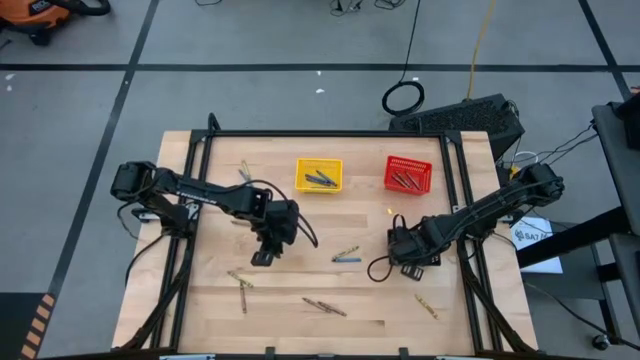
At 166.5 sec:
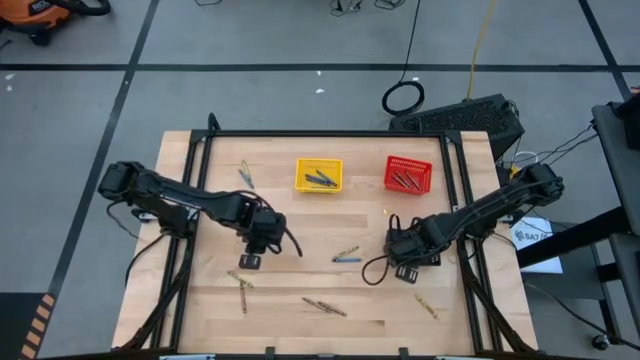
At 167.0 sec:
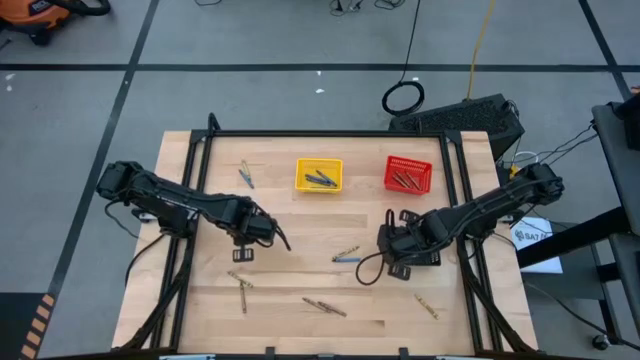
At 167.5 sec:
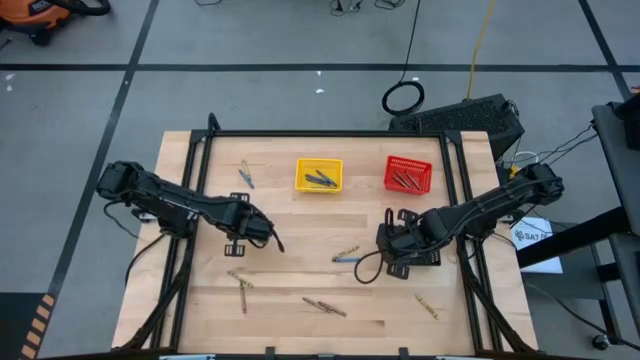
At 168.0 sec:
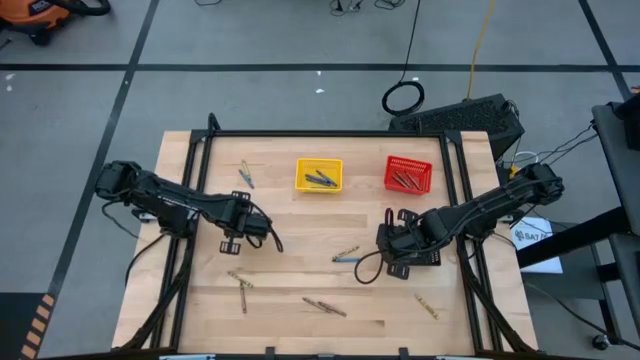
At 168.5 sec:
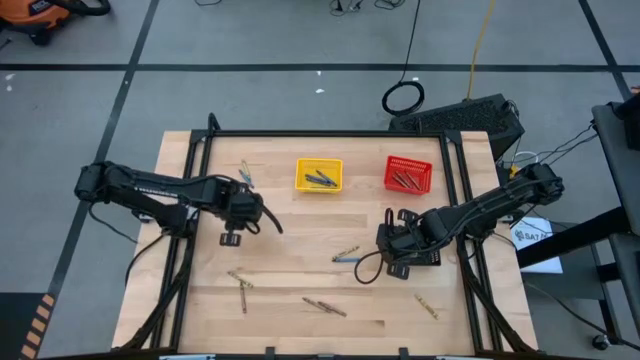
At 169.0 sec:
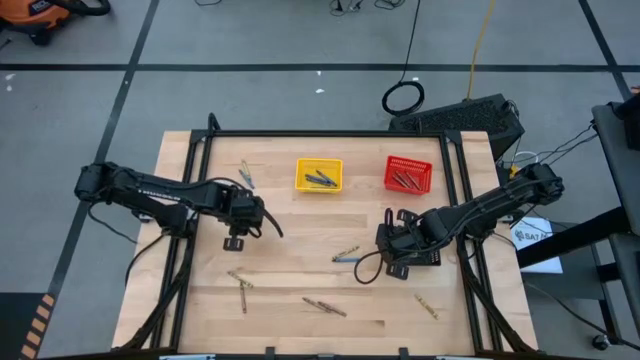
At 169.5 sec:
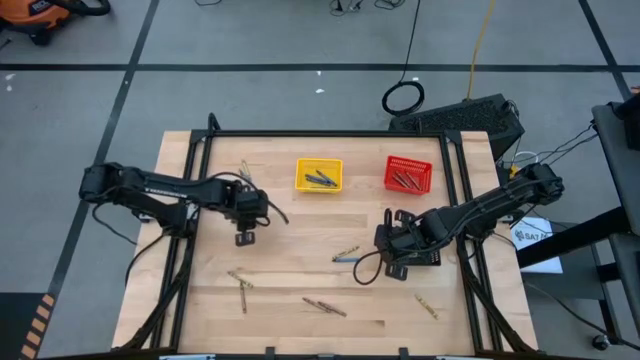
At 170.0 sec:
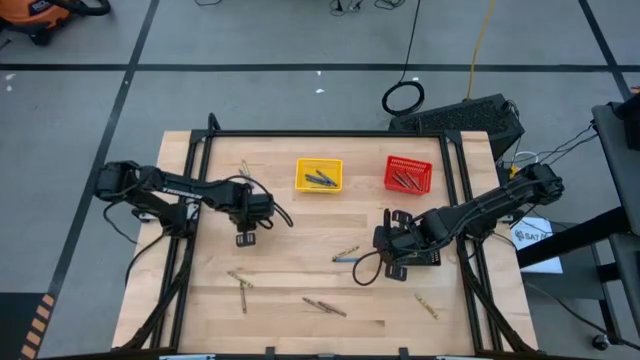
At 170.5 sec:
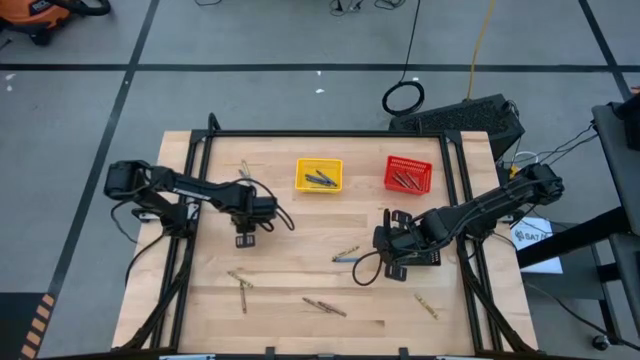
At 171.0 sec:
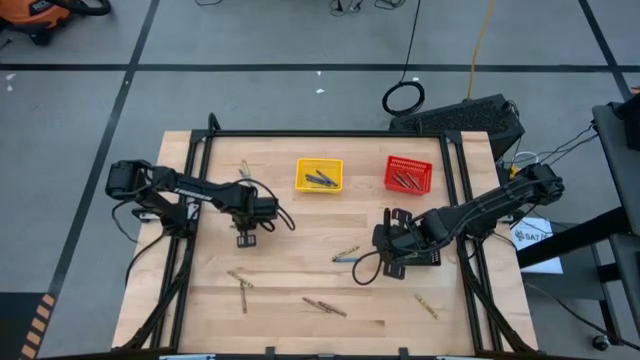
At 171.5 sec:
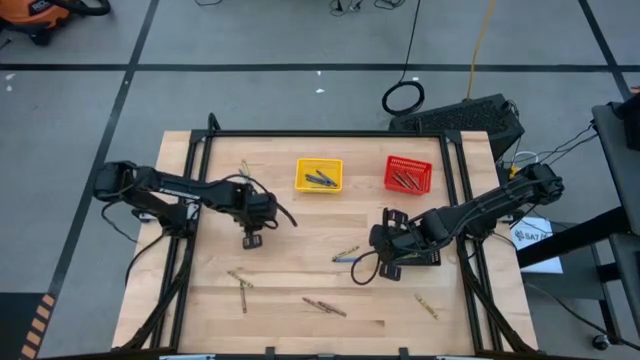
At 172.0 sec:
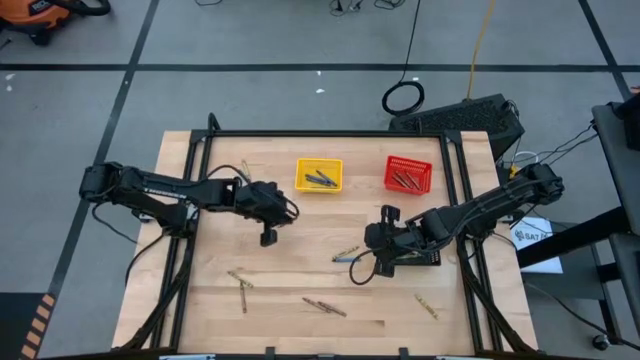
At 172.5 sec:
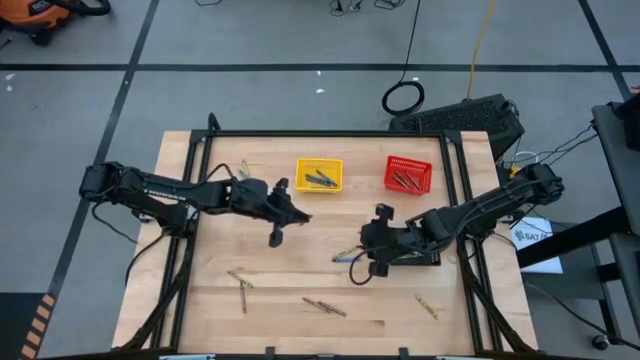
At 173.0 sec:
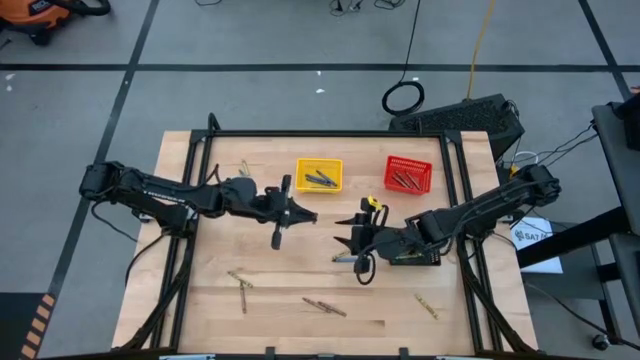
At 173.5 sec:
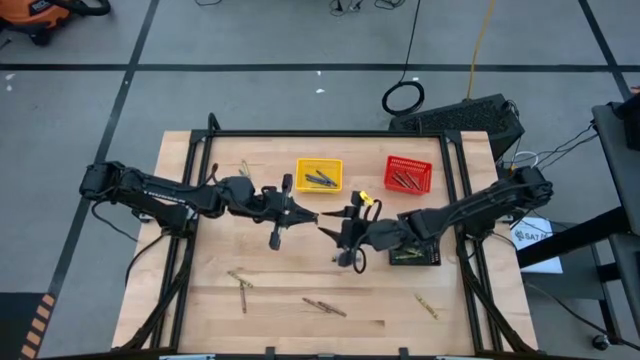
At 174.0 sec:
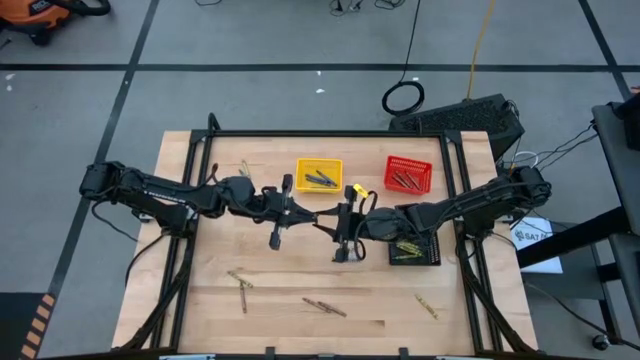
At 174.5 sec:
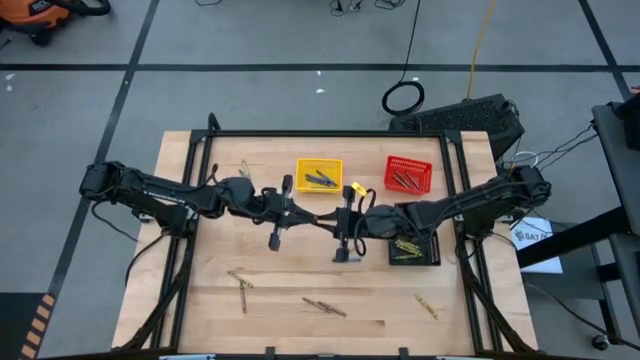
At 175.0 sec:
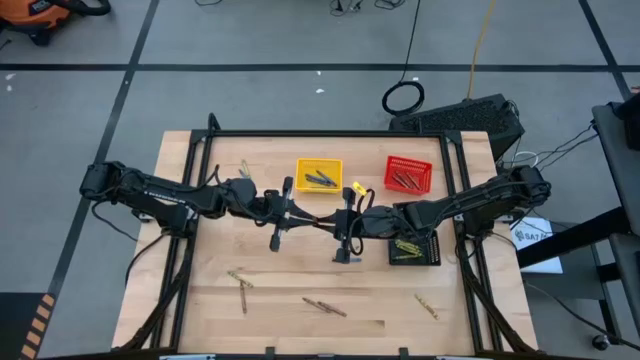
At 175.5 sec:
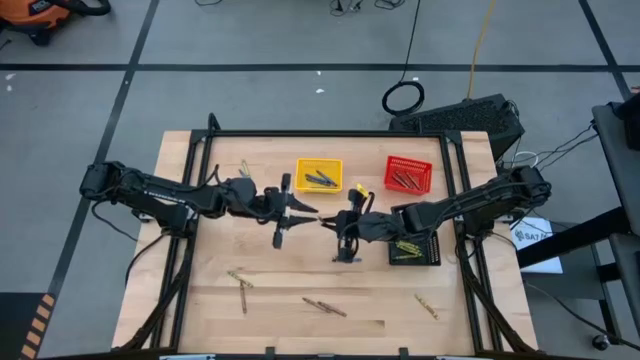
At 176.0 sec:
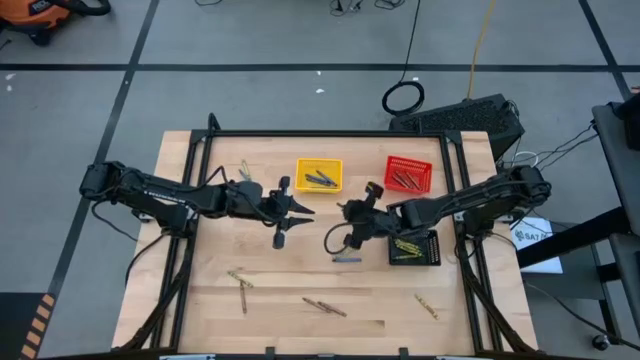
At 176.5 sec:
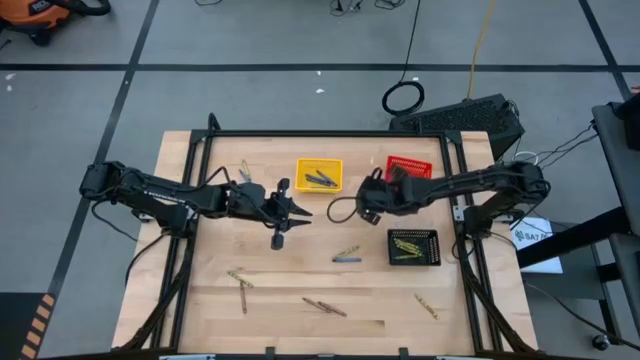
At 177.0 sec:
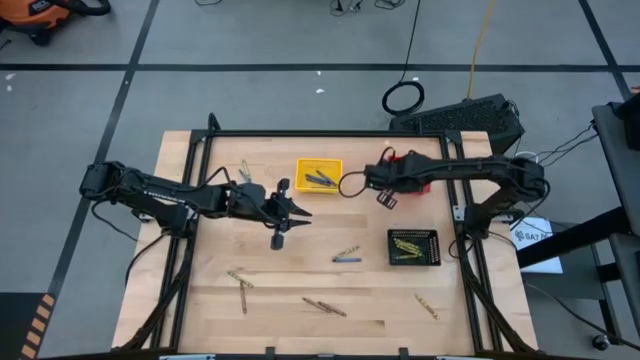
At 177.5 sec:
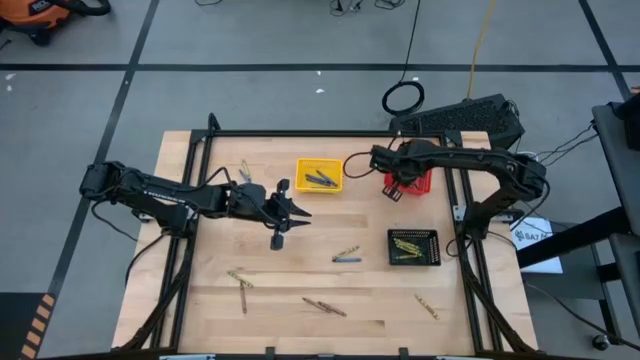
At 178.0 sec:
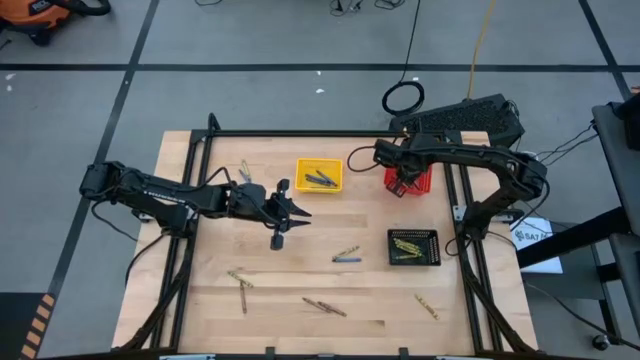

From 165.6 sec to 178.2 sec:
Task: Sort crayons
Put the brown crayon into the red bin

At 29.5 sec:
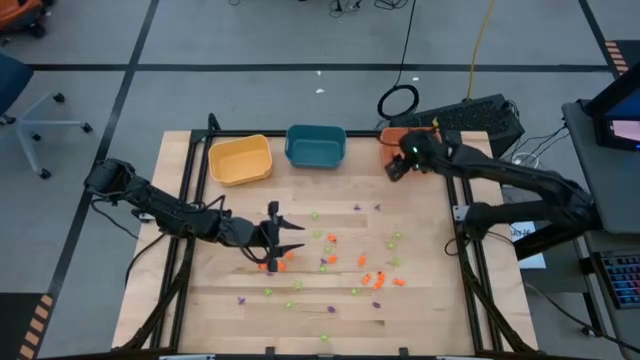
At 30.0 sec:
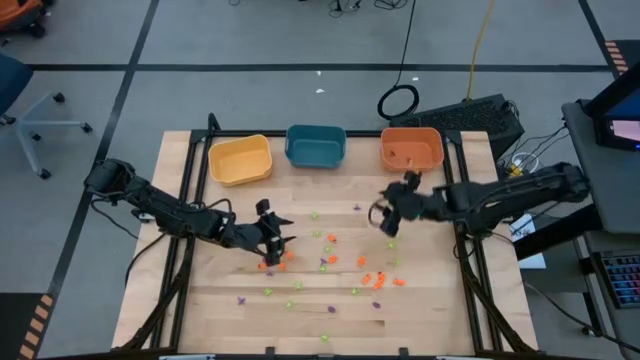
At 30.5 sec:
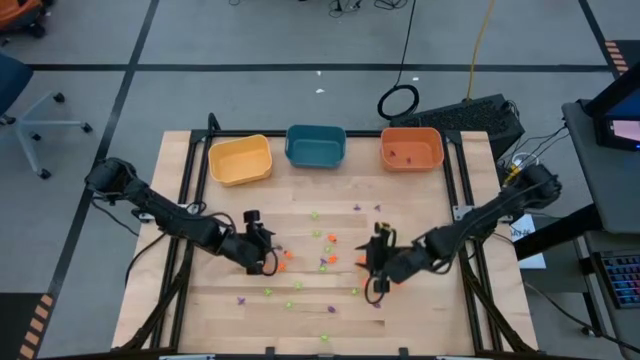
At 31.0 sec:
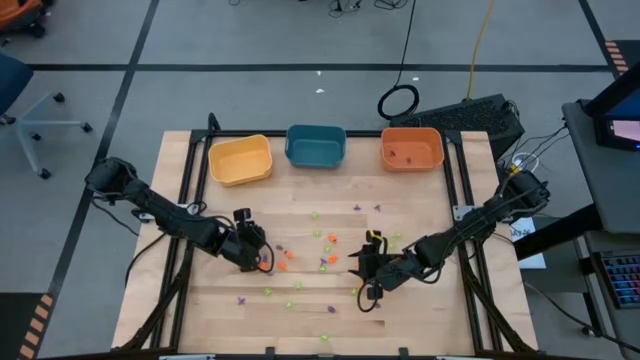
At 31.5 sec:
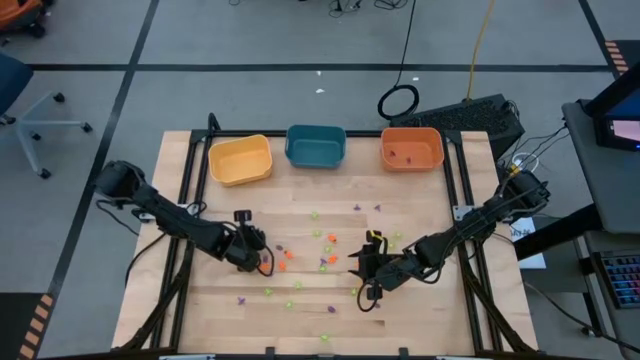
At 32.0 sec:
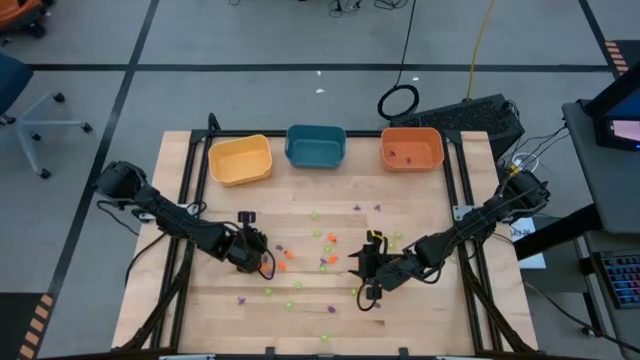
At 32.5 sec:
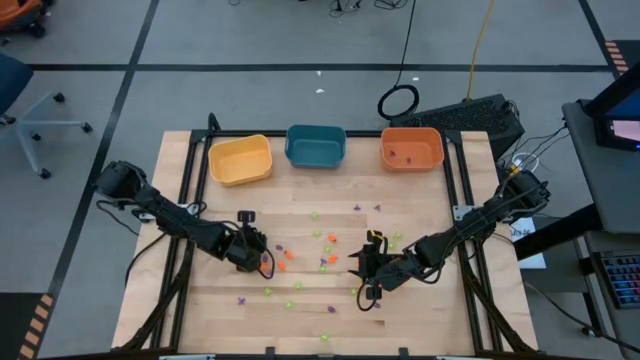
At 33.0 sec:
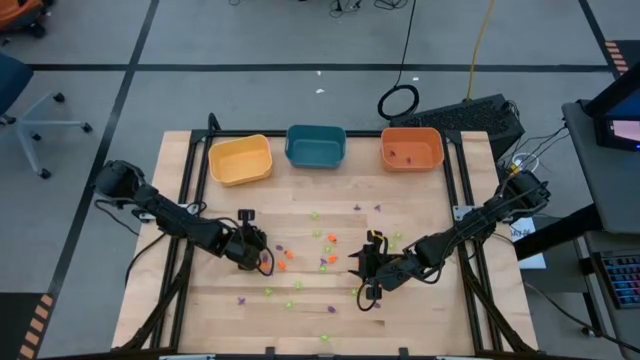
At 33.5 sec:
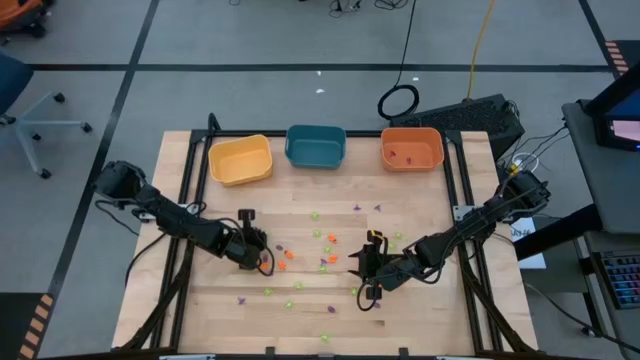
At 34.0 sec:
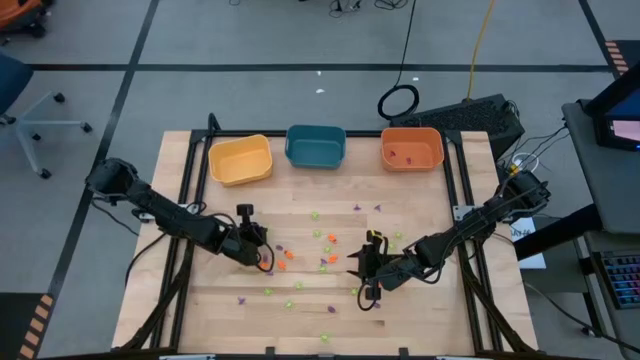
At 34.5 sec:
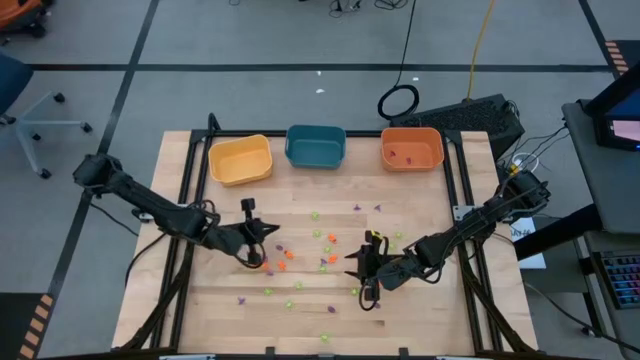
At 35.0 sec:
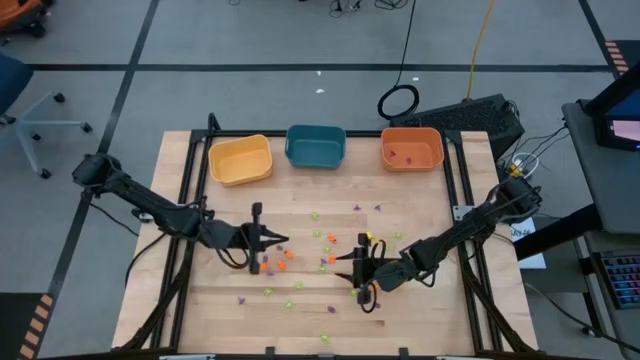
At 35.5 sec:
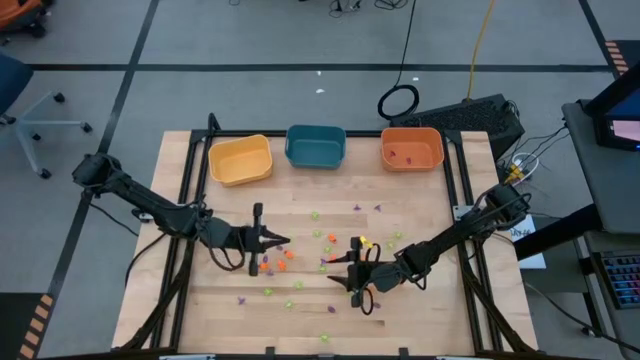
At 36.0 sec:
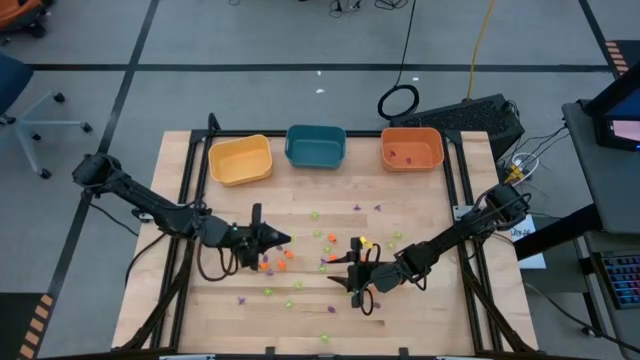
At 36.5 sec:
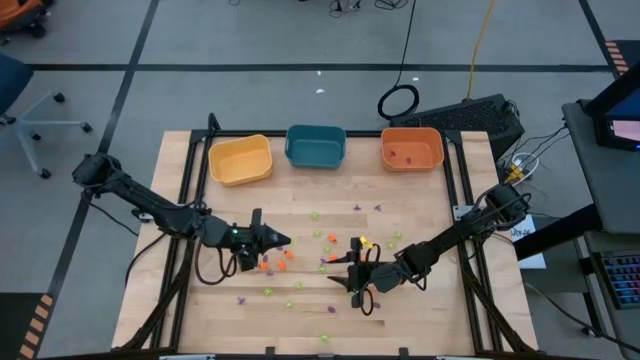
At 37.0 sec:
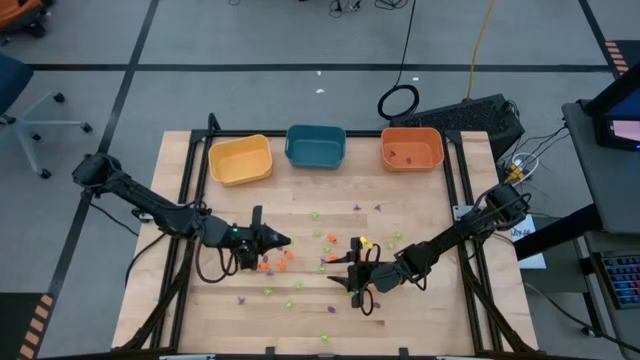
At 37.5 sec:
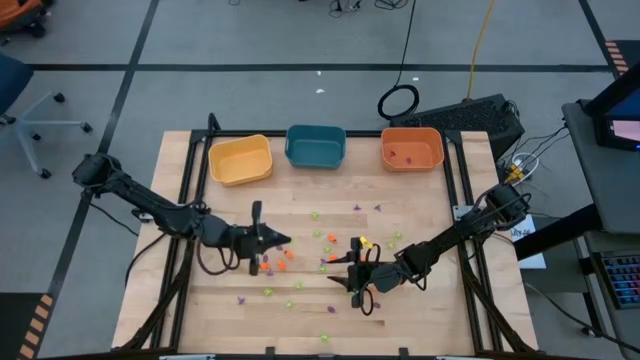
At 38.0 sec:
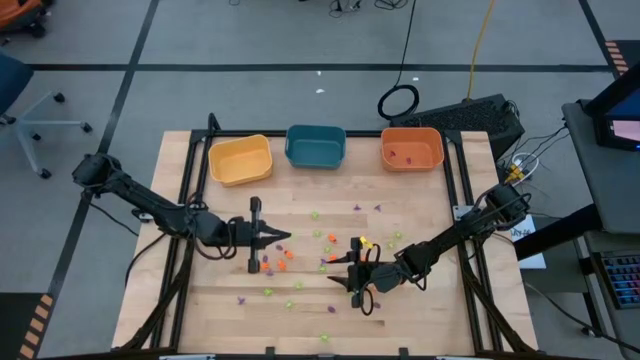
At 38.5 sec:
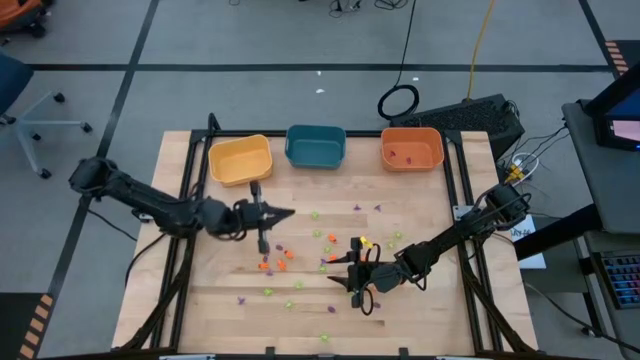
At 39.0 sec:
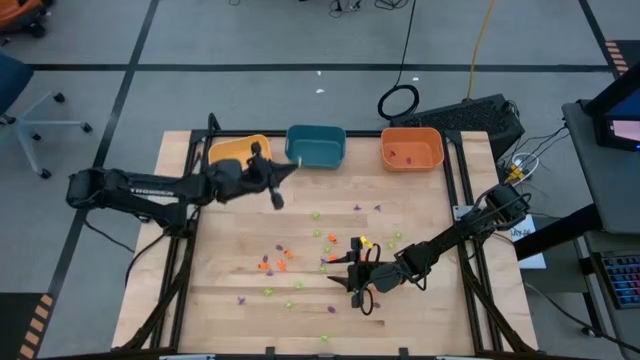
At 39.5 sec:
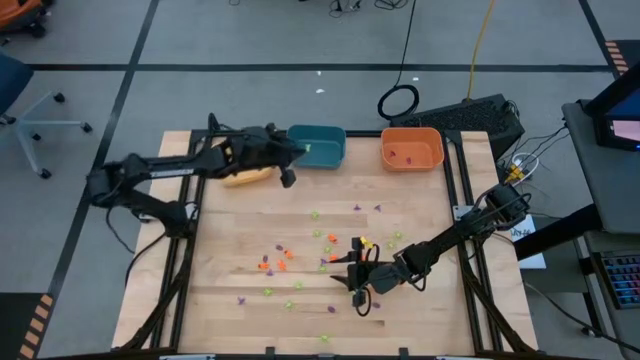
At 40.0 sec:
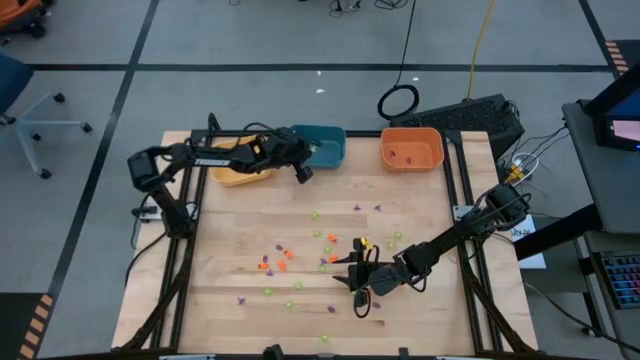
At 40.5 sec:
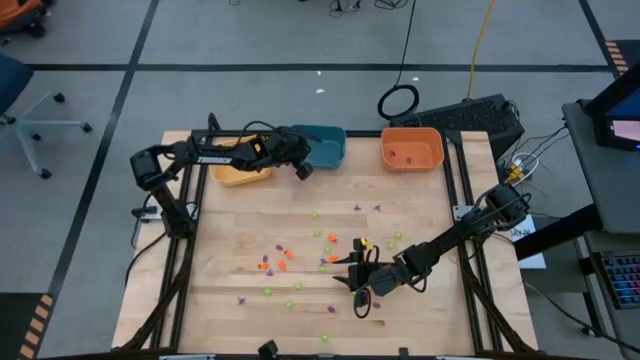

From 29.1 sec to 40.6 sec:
Task: Sort Halloween decoration
Put the green spider toy into the blue bin
